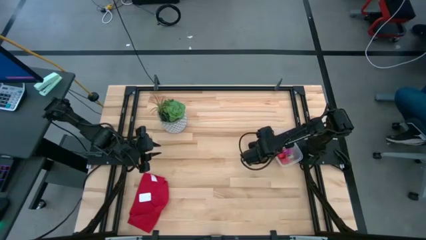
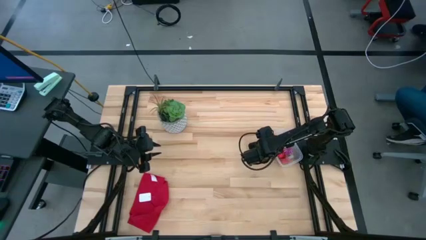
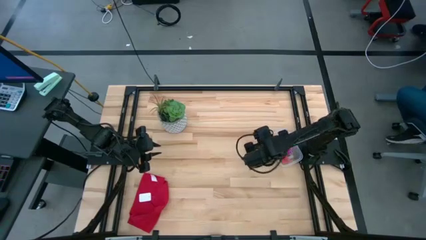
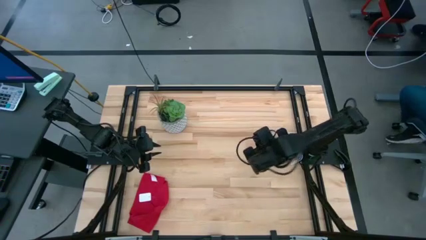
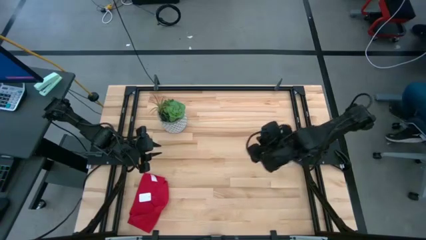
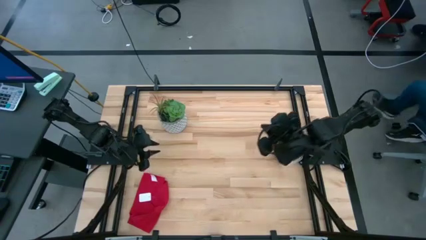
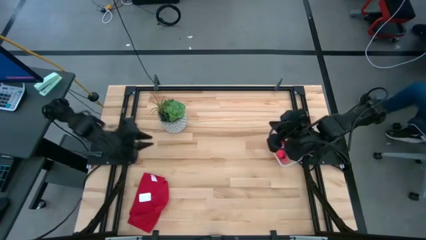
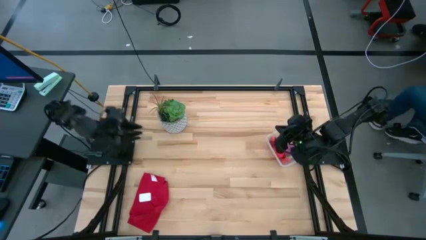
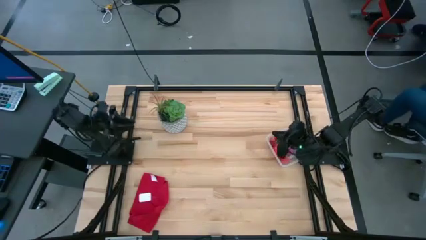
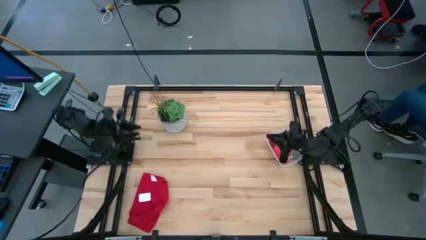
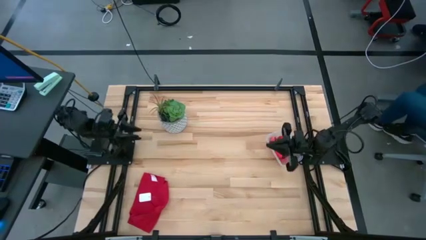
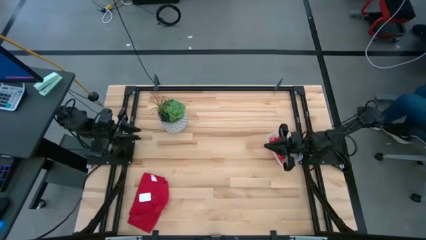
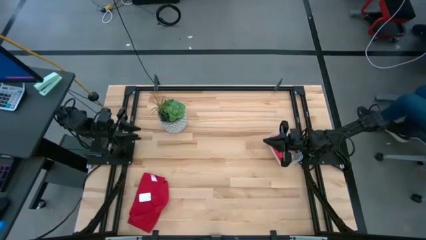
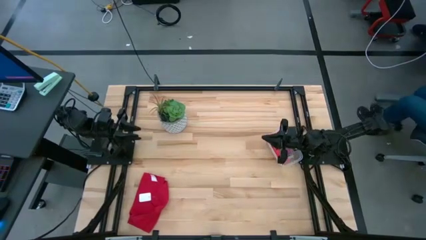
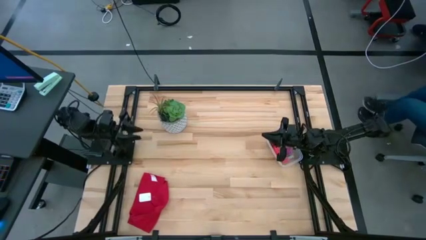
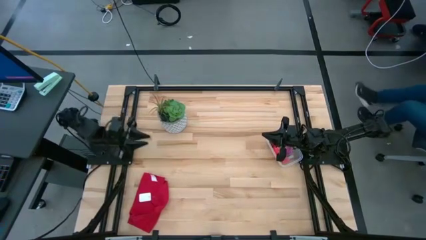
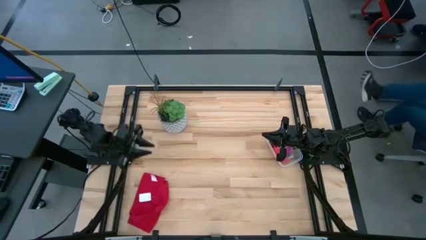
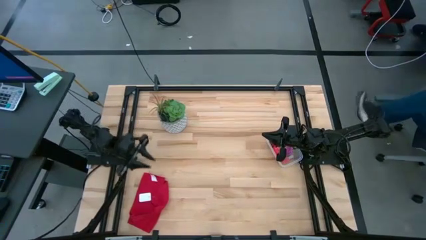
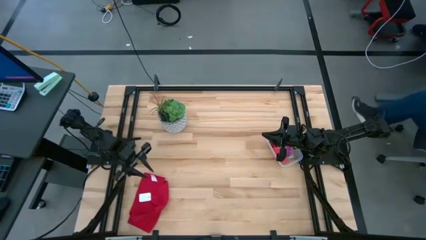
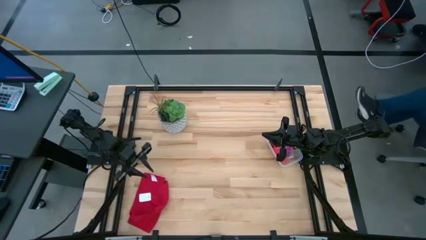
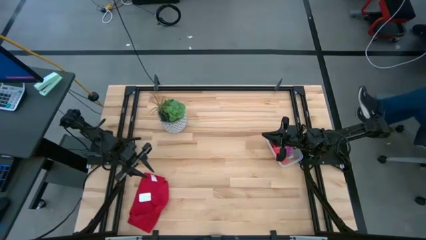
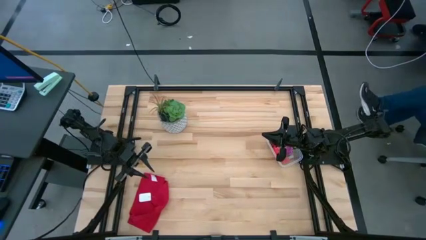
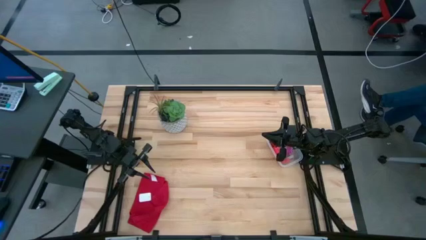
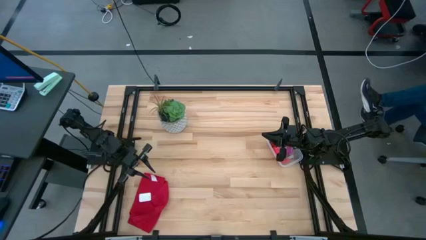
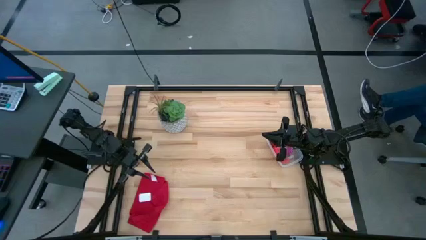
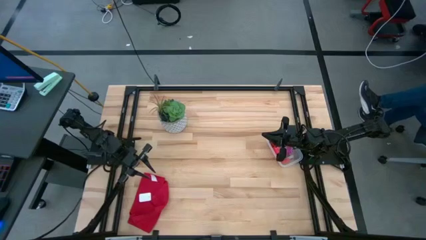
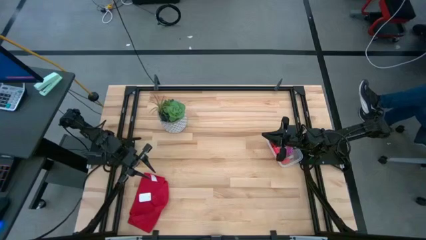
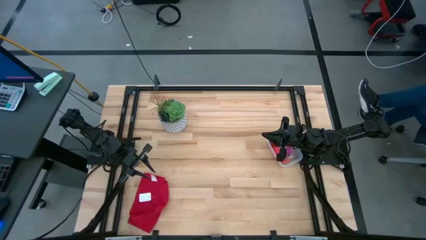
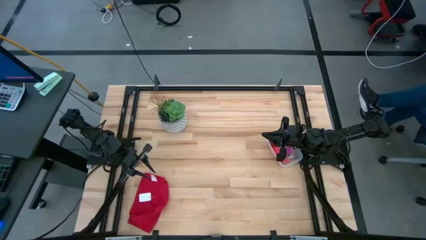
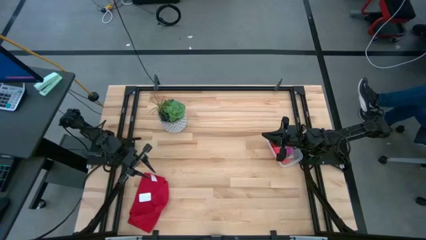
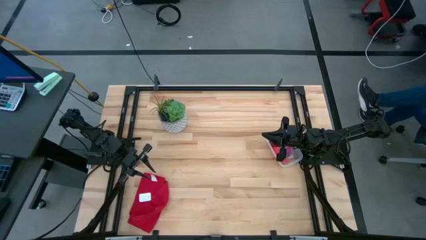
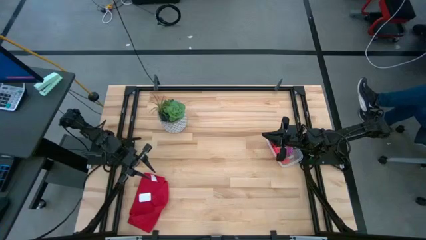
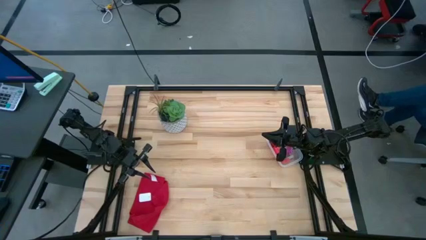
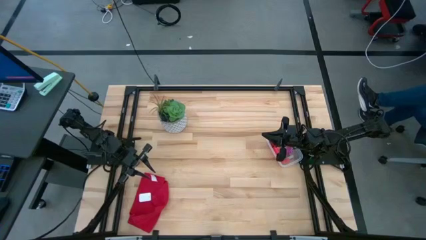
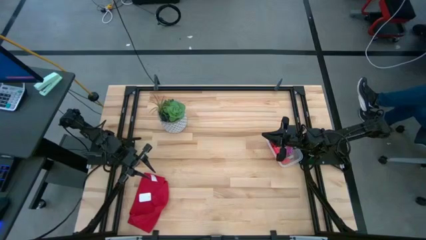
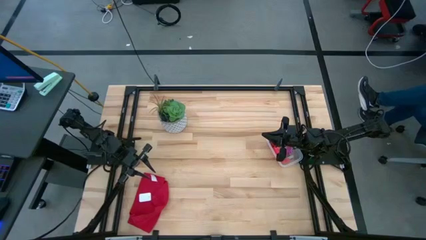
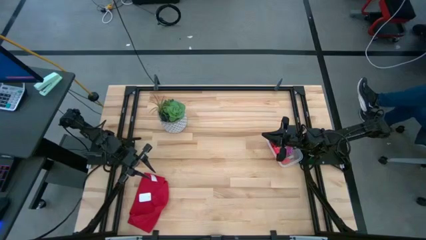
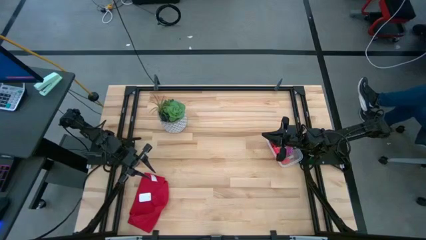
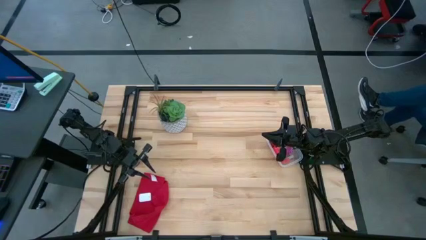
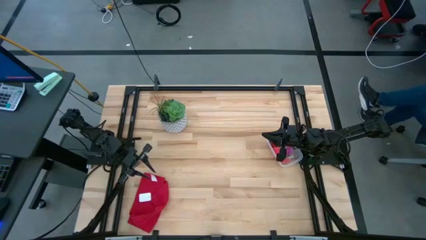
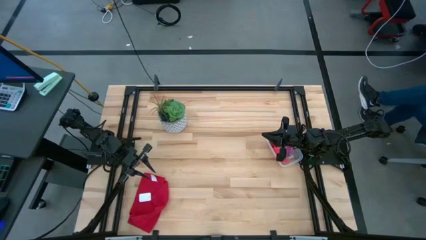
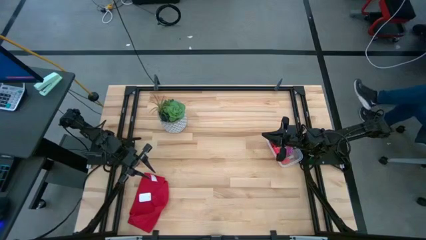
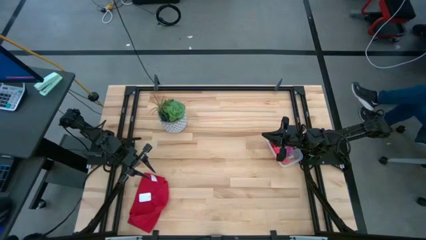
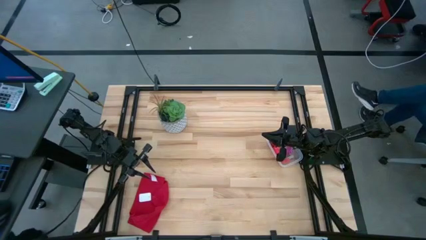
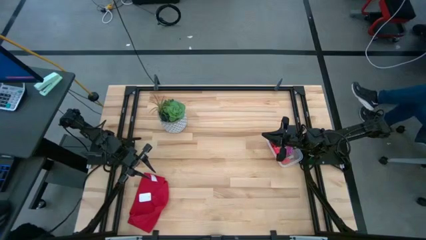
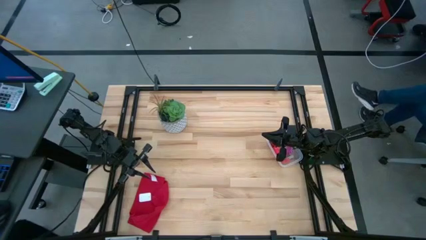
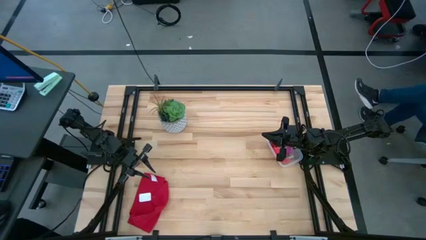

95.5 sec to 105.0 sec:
Task: Pick and placing Produce into tupperware
Return to Home Position

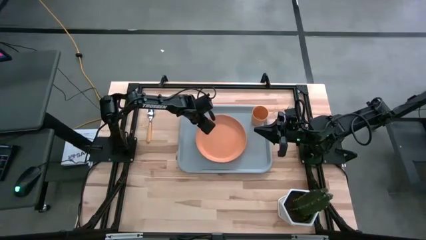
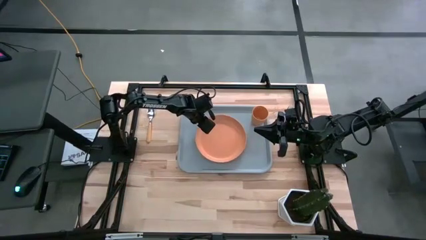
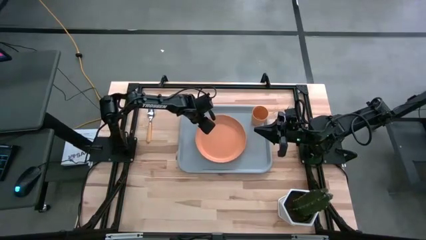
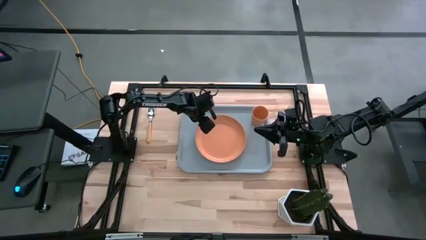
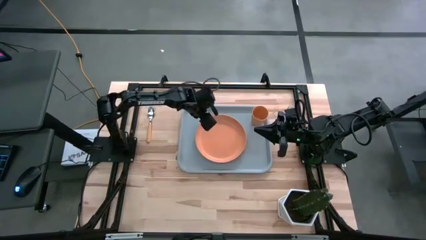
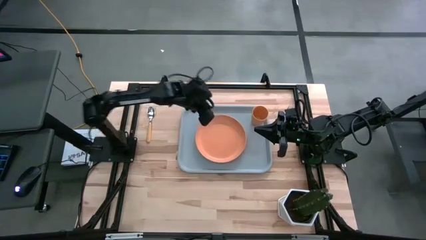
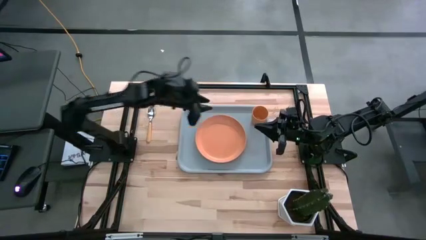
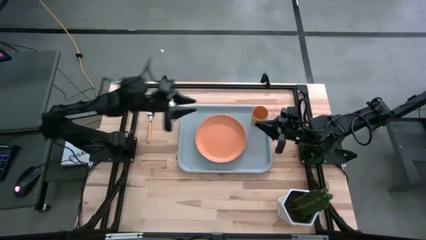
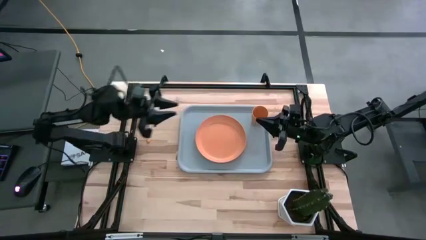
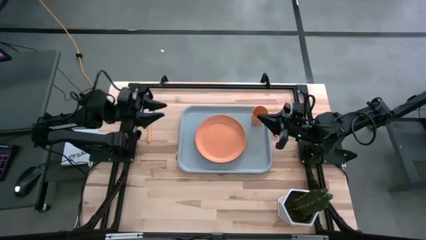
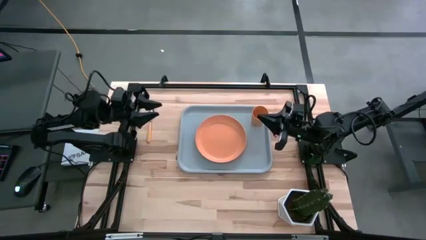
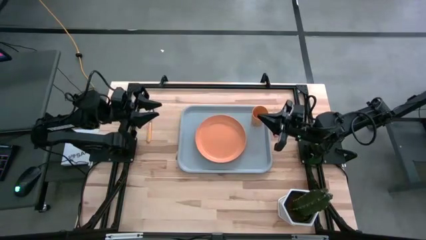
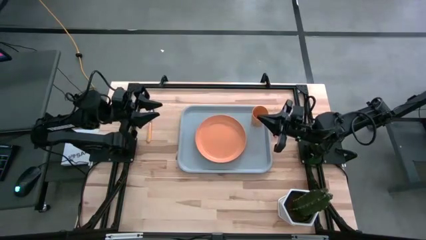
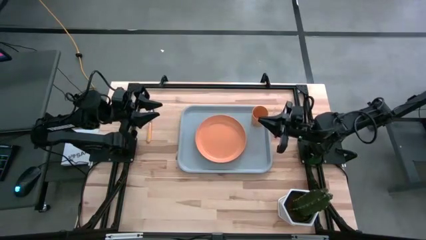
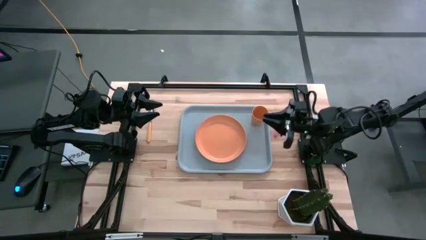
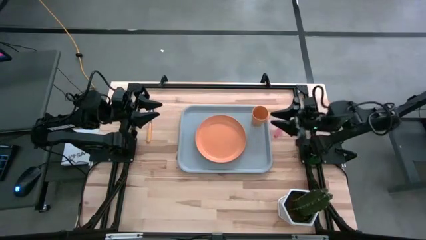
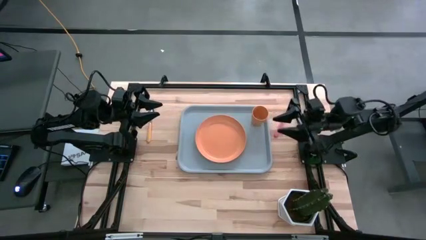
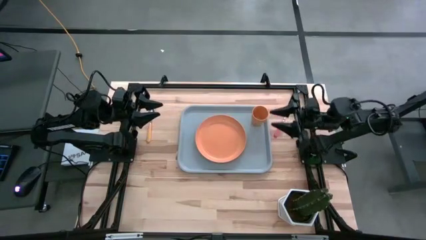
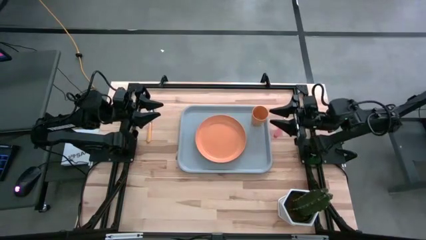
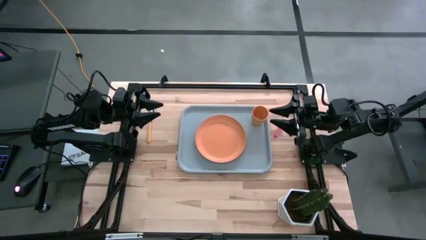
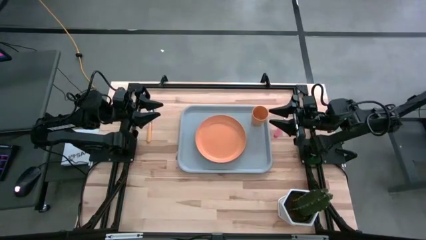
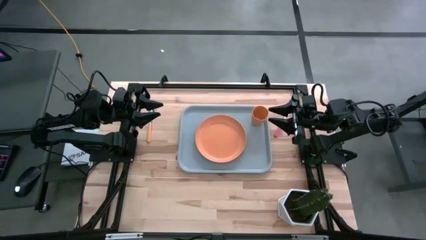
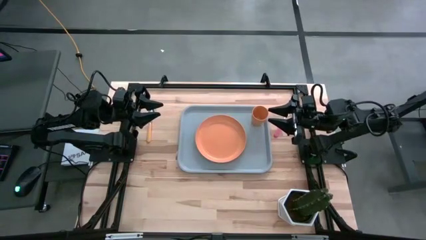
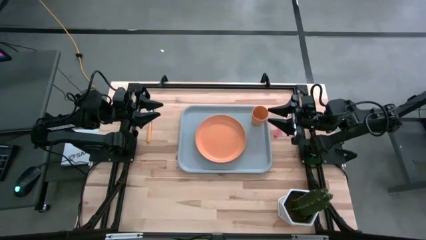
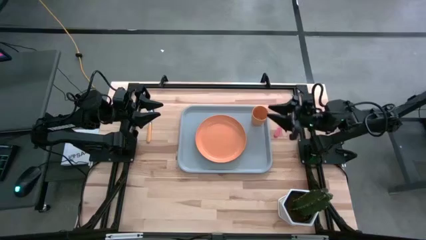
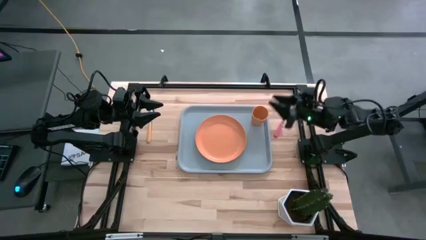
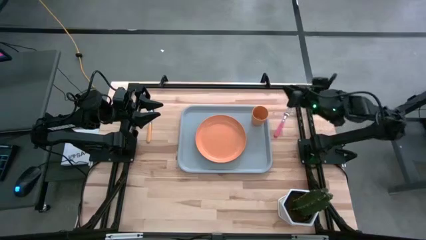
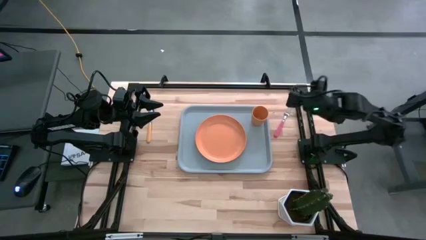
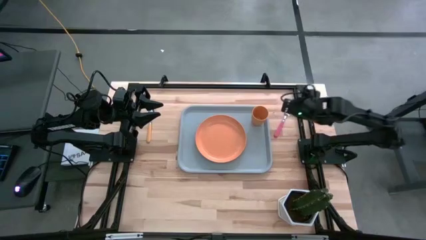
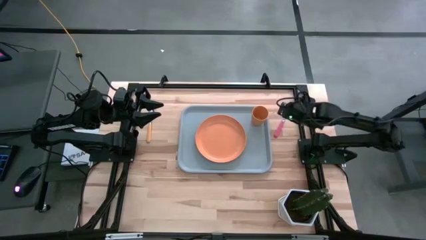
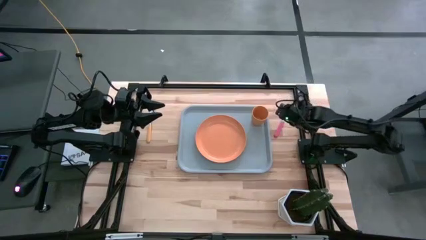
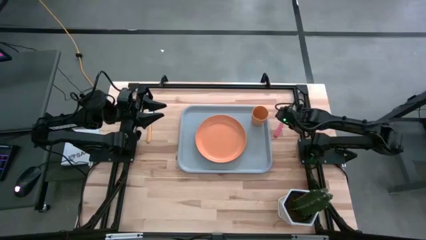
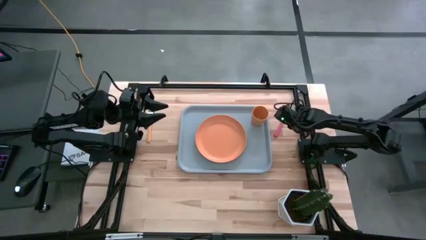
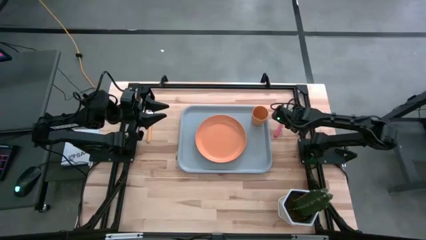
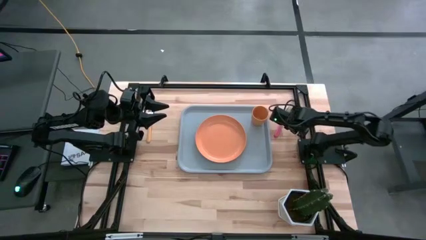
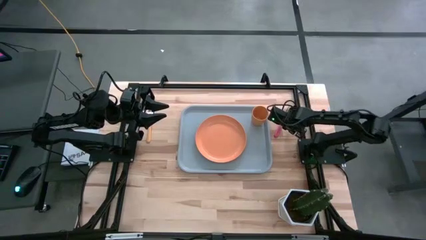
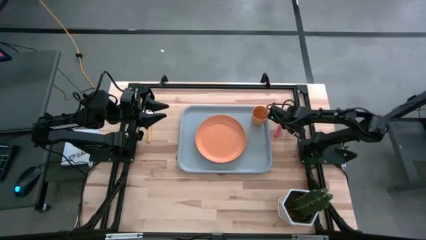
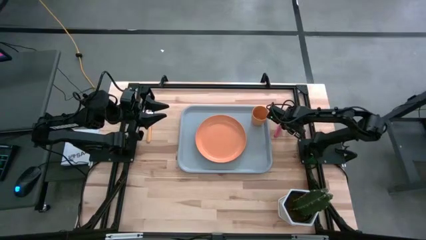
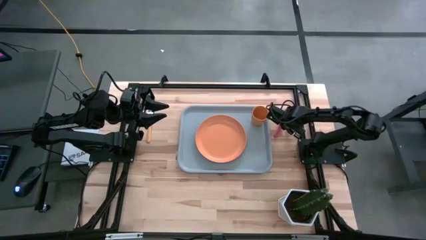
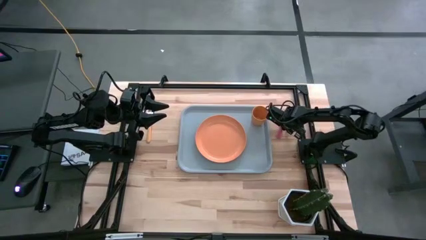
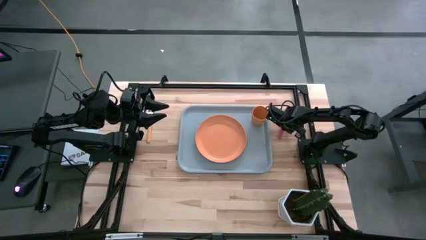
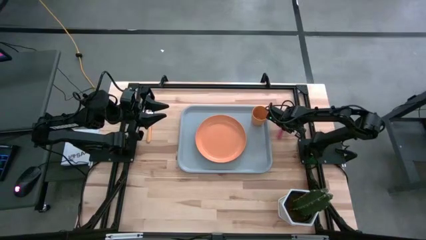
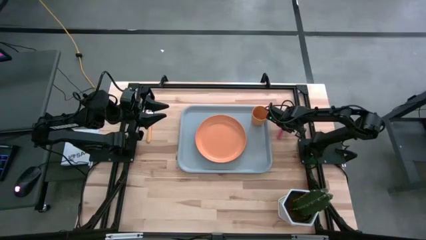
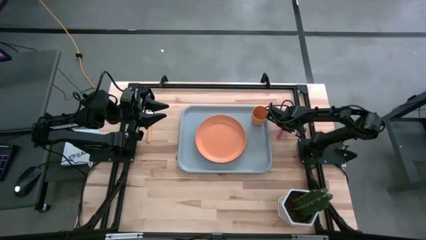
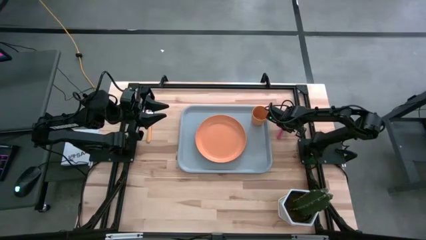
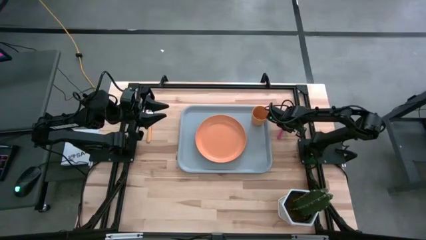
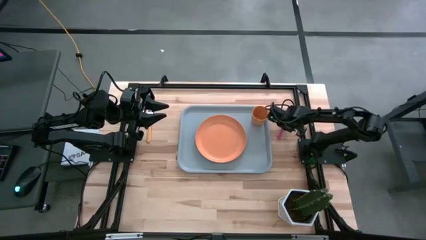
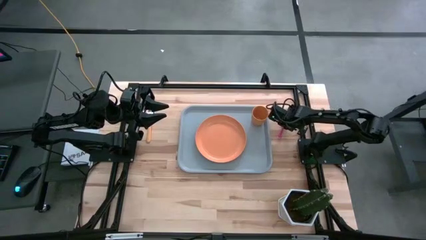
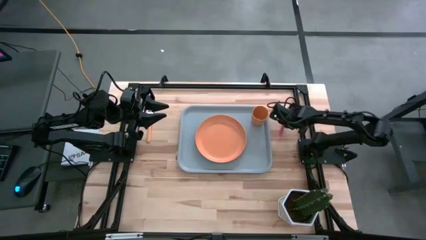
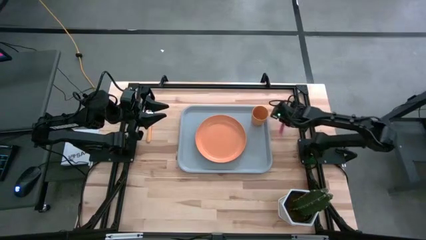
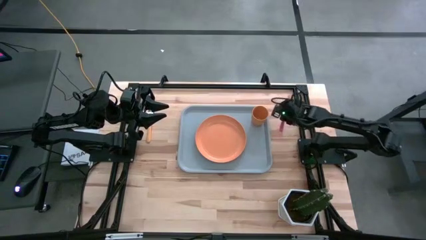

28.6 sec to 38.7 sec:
Task: Pick and place plate/cup/fork/spoon on tray
Put the pink fork on the gray tray to the left of the orange plate
